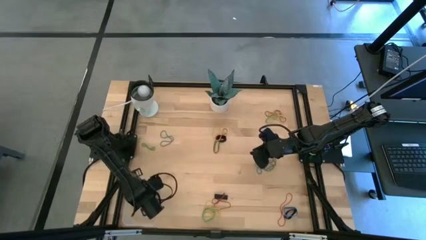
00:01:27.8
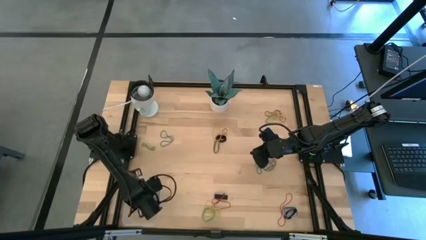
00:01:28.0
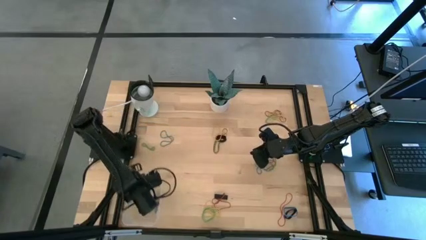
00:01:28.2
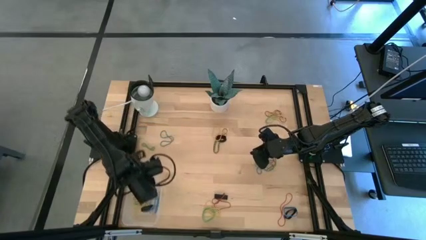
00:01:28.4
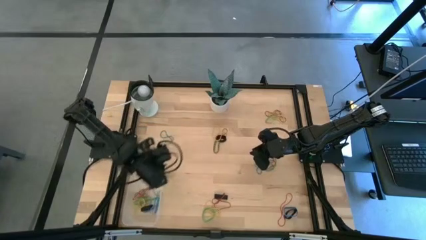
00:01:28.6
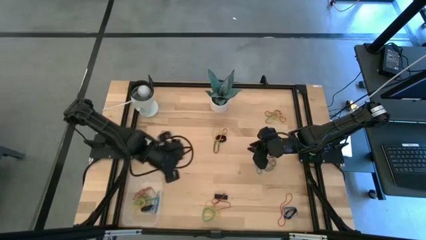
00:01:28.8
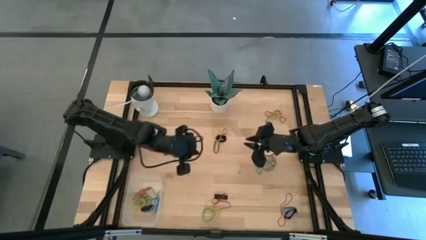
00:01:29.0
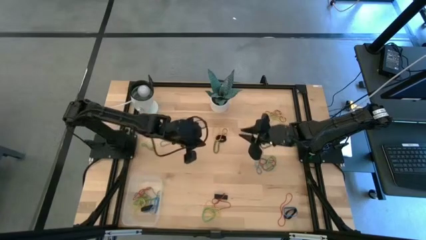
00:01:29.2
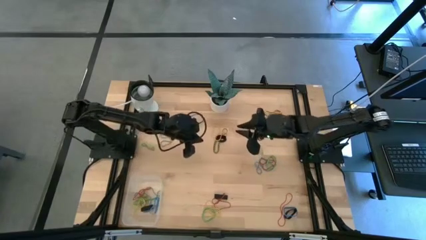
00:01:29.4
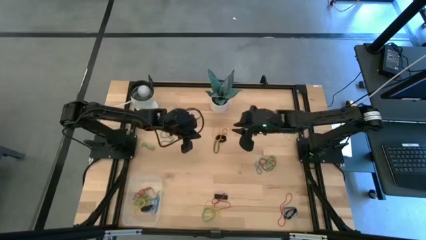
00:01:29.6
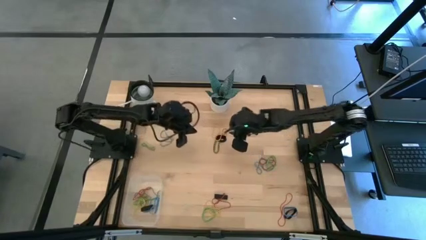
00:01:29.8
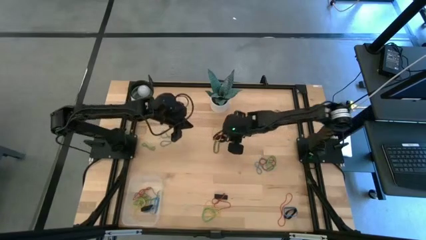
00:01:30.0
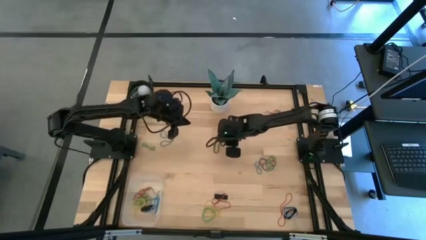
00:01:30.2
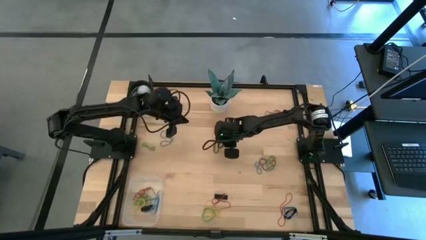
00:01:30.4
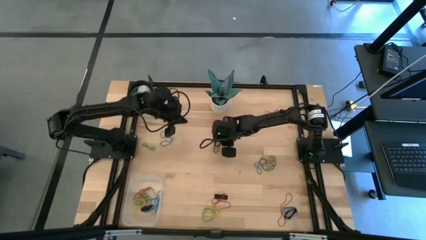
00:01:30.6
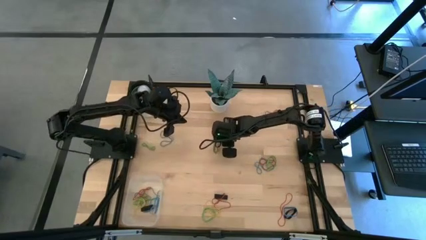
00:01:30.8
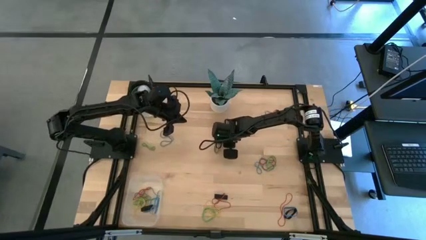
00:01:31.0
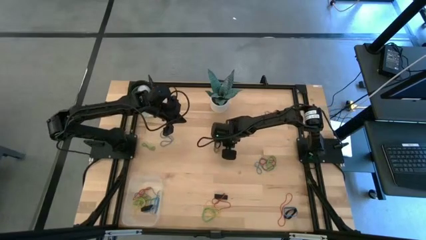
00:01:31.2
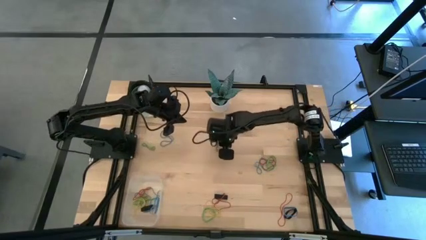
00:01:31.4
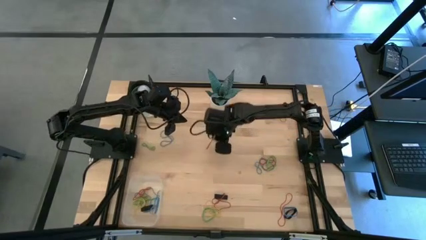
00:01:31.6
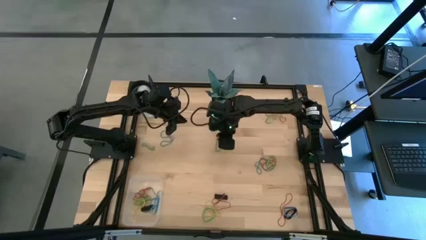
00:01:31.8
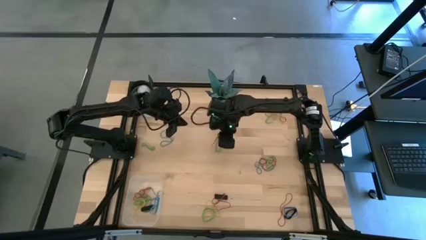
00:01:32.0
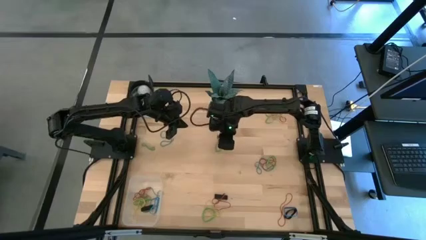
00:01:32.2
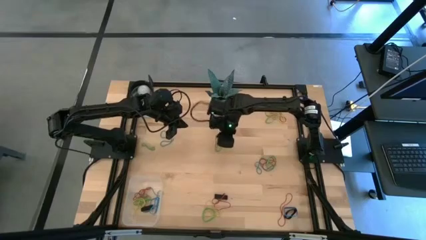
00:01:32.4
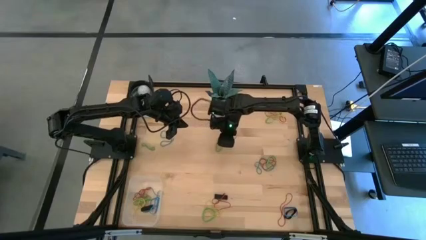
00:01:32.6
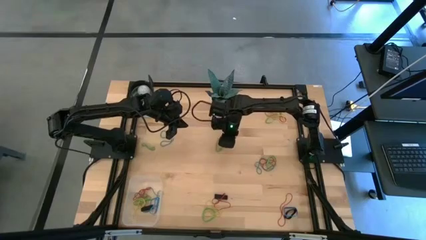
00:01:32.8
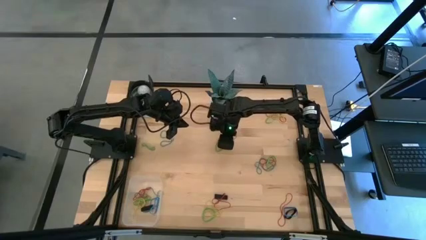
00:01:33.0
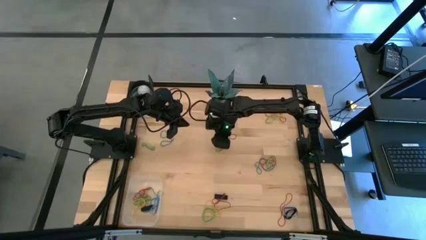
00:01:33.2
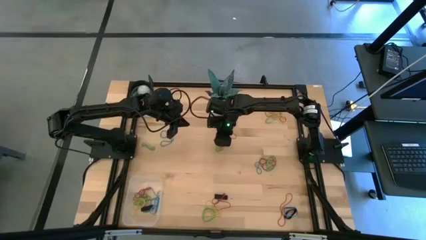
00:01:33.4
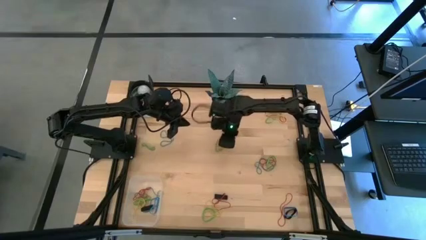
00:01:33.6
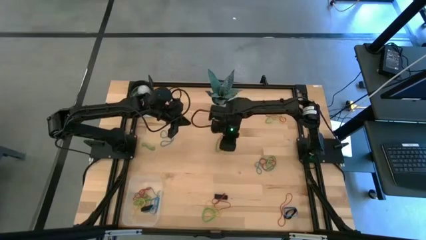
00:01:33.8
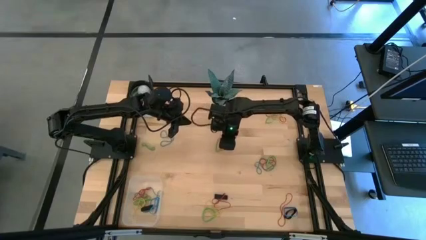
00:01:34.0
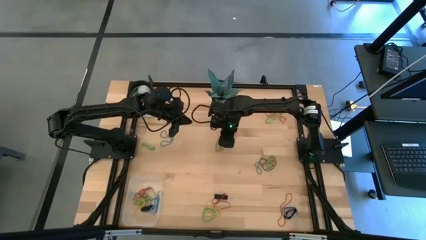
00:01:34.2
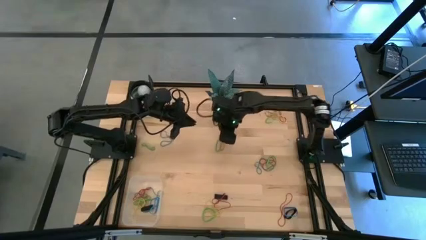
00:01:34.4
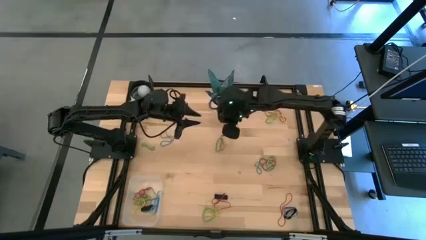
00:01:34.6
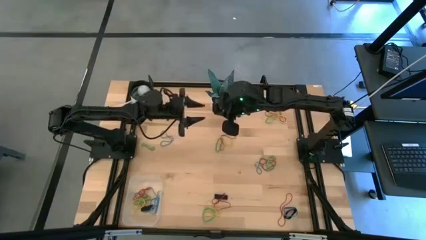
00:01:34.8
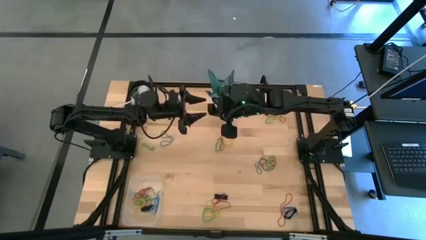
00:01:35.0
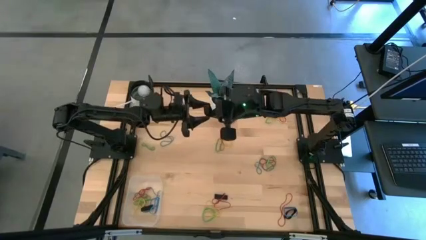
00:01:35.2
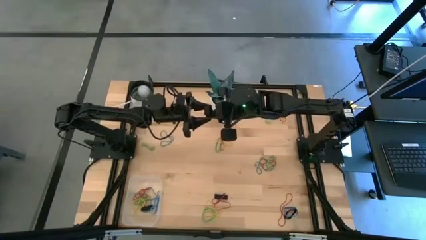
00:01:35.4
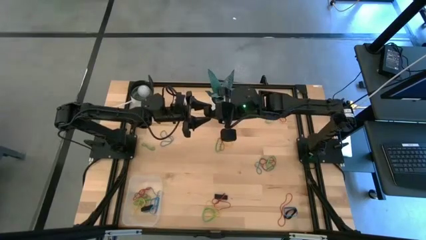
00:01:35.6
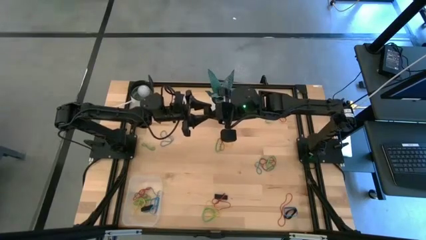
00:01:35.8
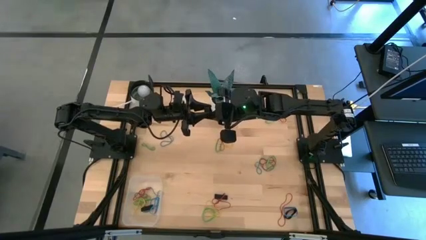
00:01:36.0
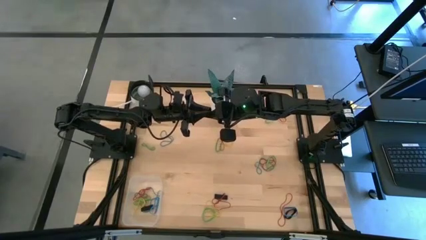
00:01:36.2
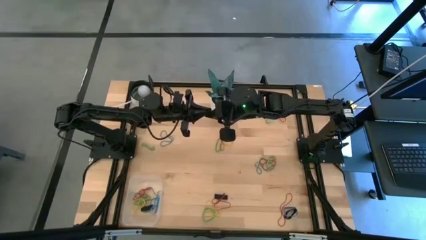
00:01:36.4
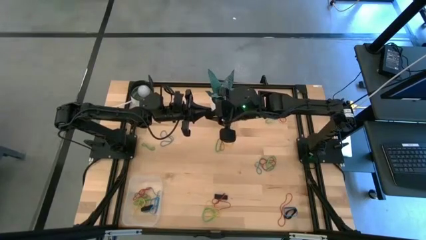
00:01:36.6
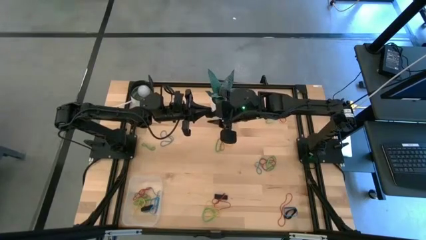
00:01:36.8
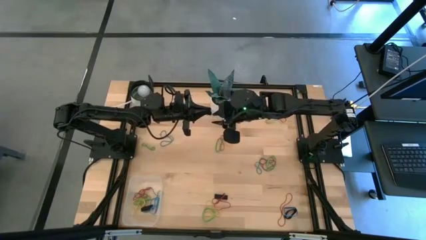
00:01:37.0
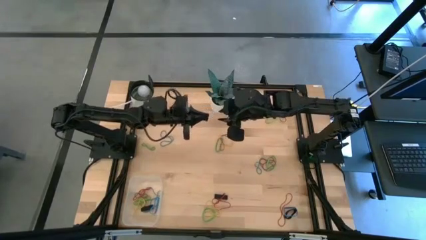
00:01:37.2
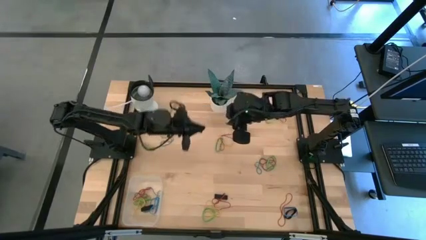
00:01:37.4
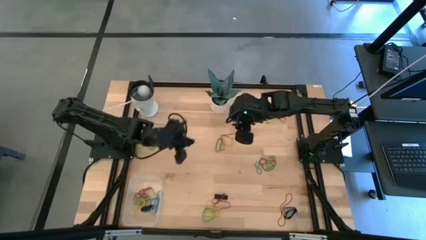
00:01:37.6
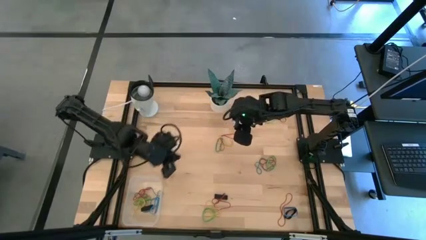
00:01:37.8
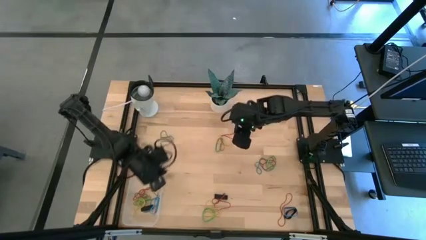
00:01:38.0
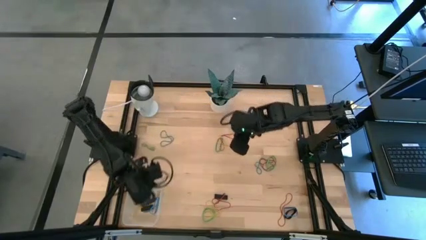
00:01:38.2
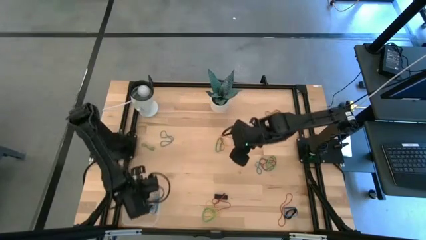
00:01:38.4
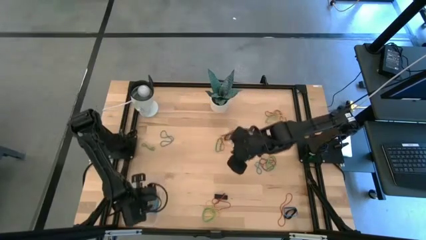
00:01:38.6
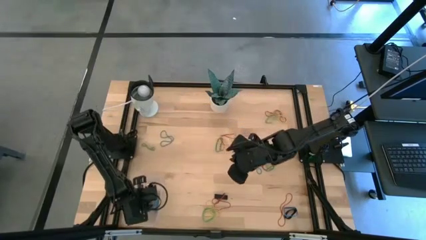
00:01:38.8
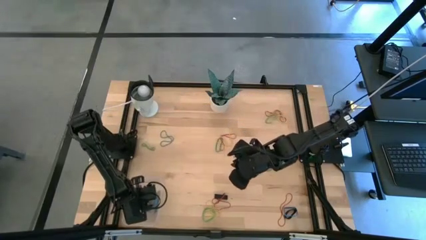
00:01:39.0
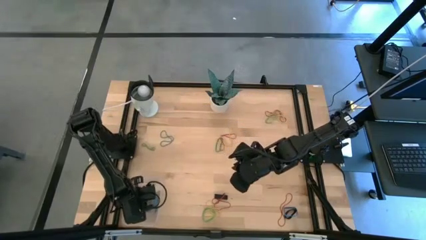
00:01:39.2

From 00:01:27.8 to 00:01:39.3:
Task: Pick and place rubber bands into bin
Put the black rubber band into the transparent bin

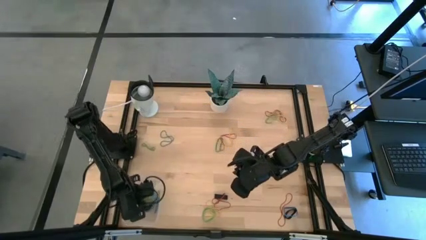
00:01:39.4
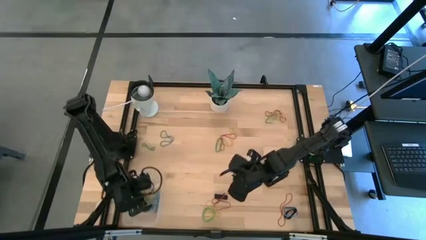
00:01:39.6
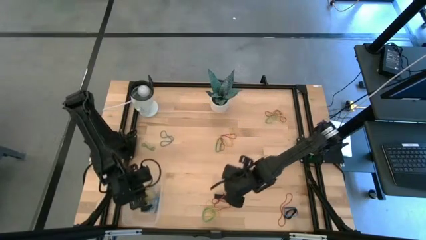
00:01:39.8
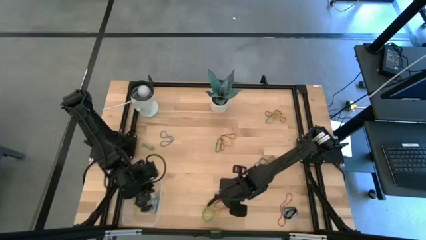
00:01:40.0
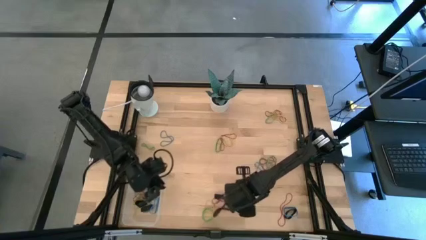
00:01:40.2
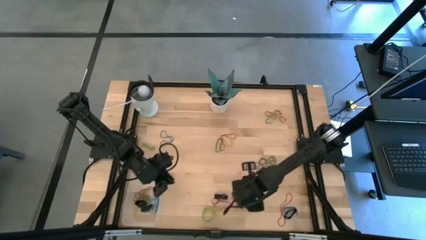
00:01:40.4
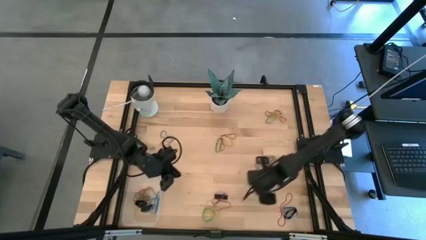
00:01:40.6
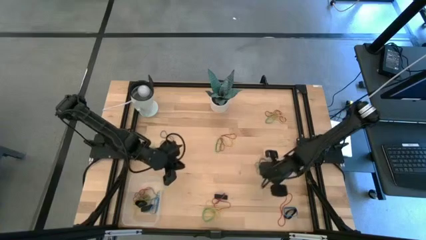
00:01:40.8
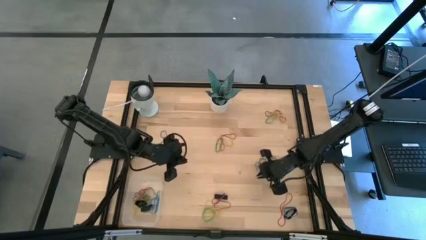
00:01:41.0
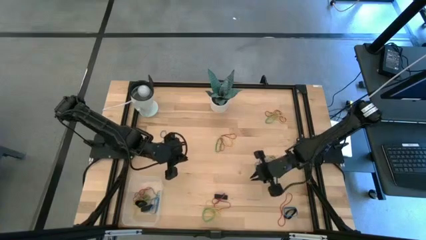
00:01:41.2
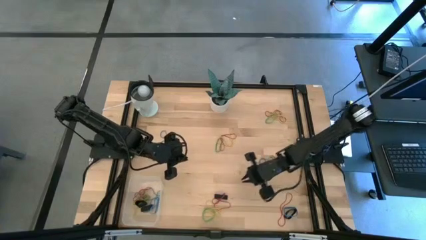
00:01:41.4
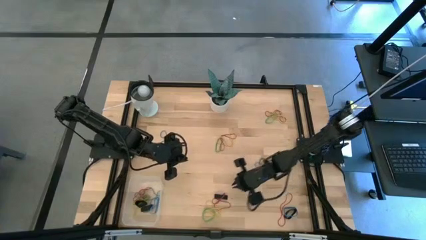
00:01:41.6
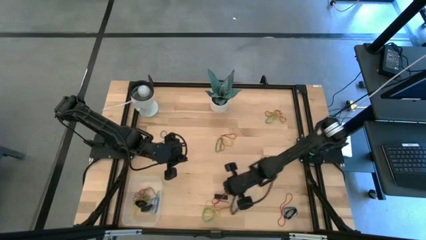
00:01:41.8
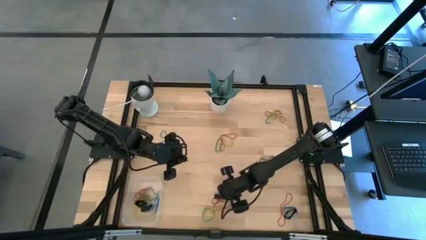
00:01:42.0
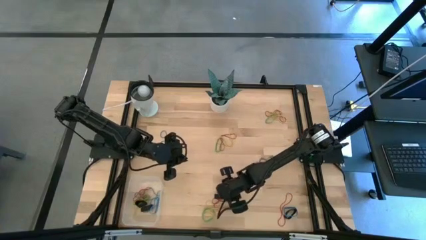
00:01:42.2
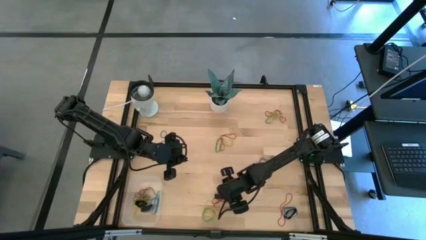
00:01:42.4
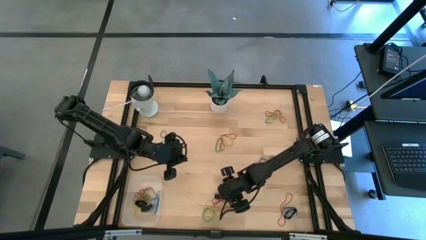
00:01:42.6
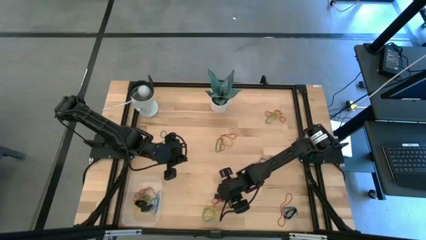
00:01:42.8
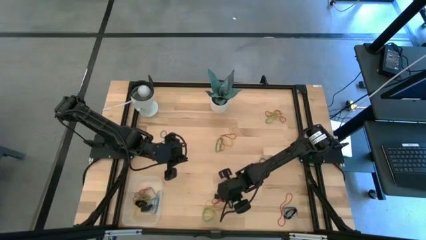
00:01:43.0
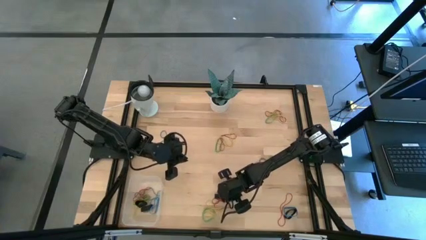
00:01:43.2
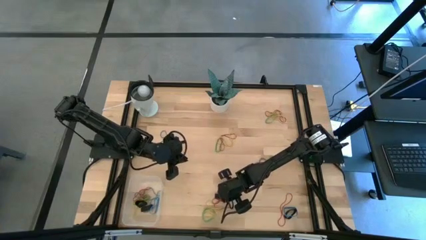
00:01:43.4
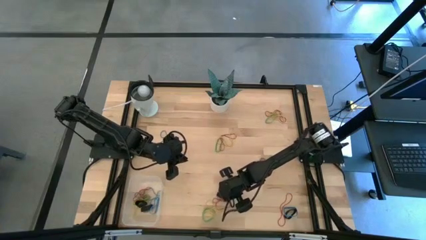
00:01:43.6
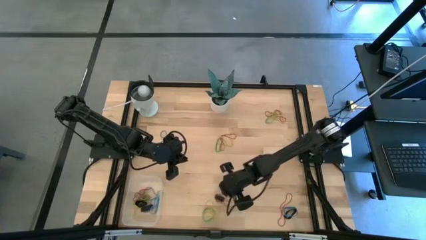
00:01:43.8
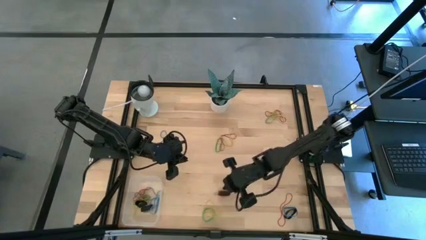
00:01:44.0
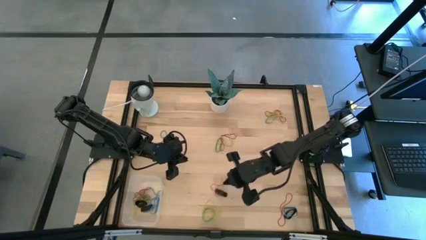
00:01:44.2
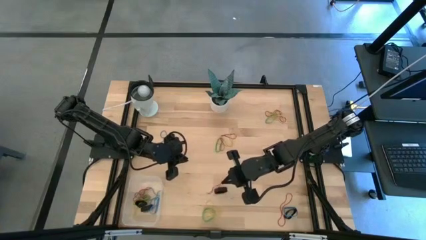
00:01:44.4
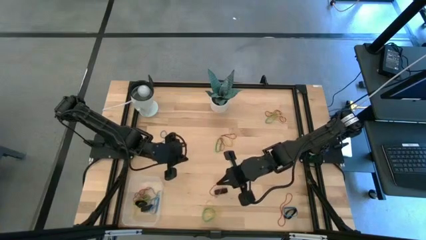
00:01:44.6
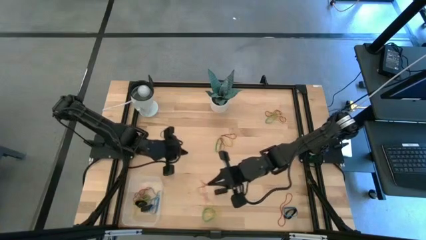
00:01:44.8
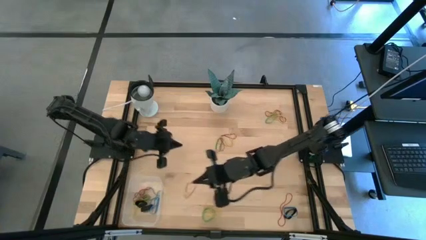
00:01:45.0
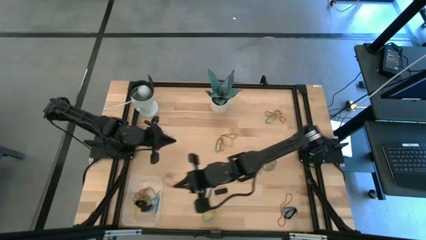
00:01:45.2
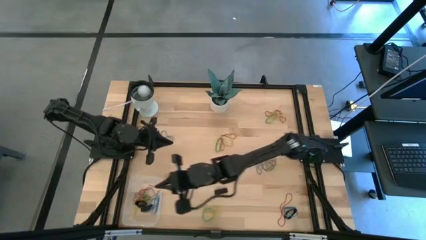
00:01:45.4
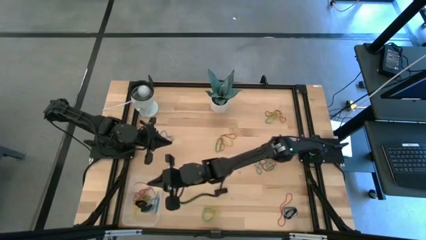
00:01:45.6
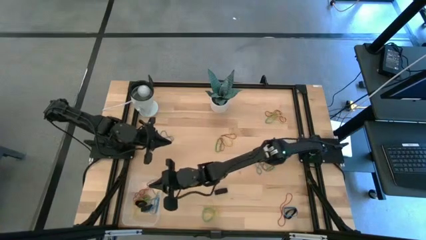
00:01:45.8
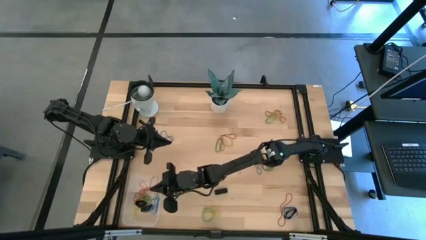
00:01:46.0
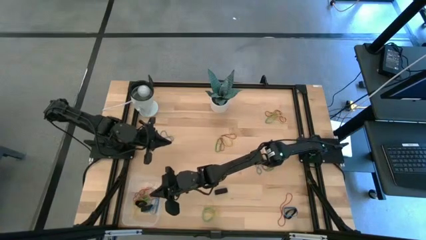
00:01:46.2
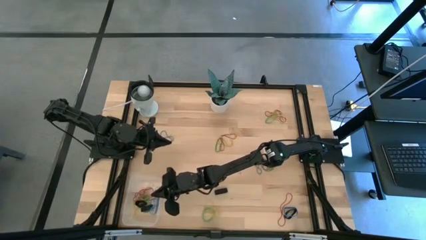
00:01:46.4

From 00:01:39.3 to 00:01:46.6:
Put the red rubber band into the transparent bin
